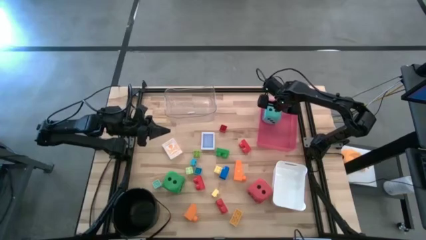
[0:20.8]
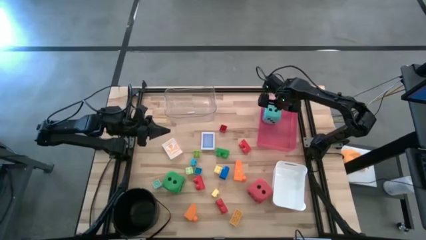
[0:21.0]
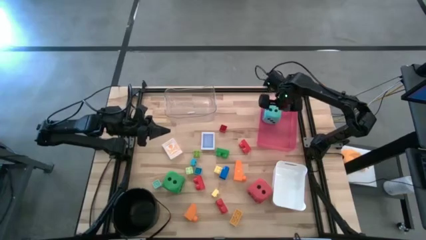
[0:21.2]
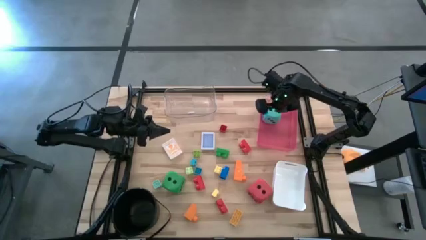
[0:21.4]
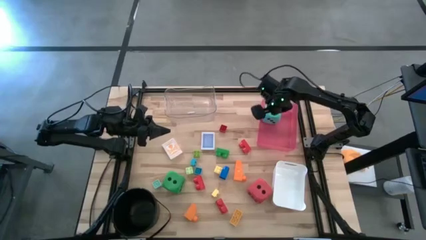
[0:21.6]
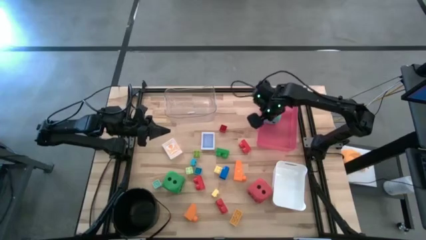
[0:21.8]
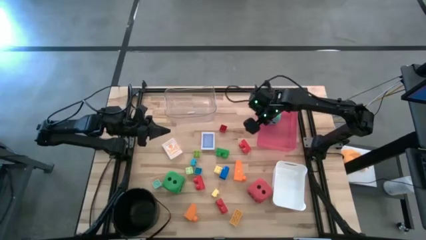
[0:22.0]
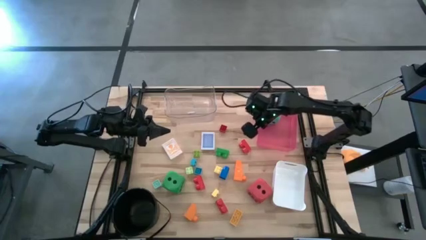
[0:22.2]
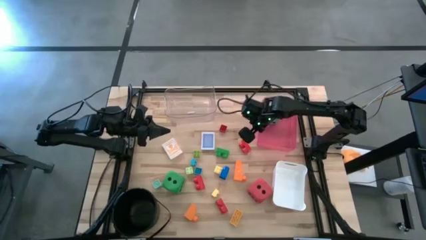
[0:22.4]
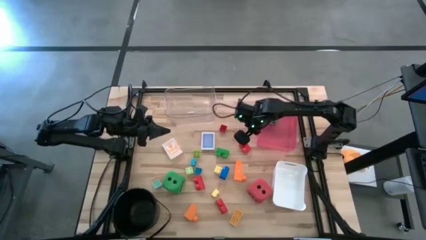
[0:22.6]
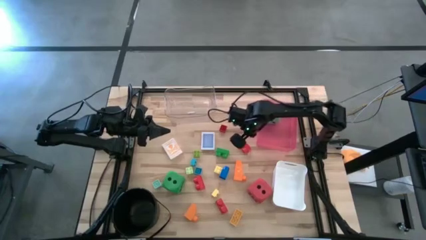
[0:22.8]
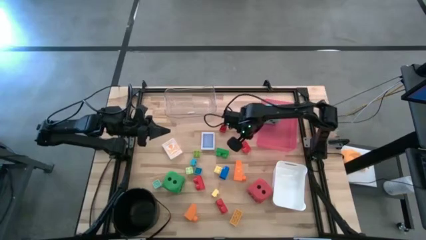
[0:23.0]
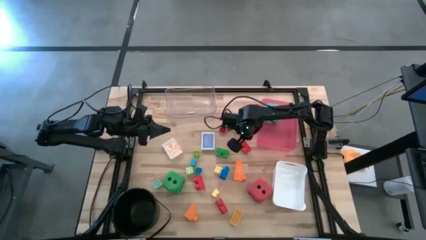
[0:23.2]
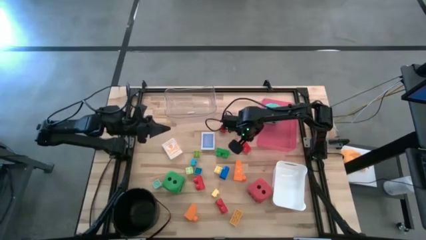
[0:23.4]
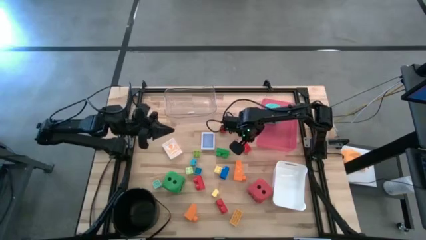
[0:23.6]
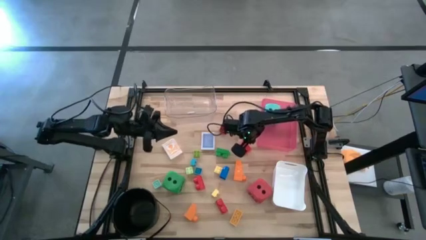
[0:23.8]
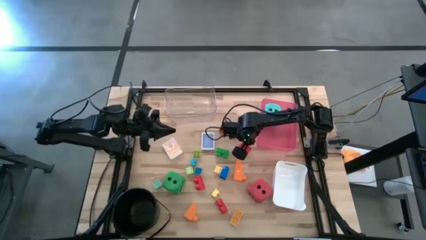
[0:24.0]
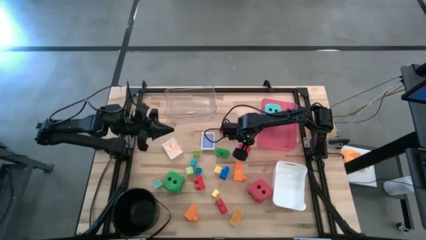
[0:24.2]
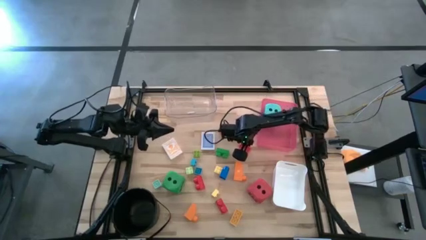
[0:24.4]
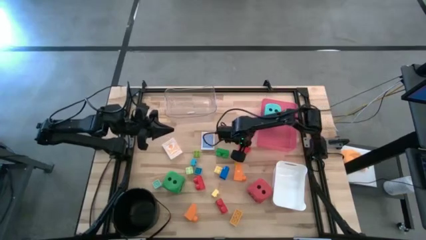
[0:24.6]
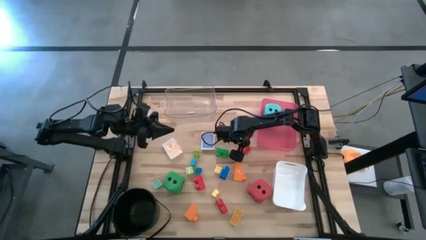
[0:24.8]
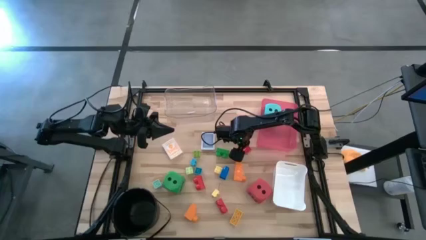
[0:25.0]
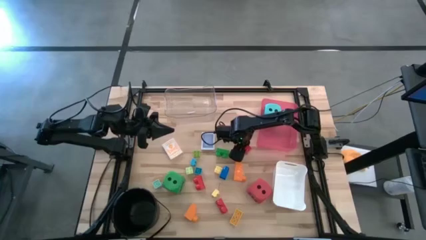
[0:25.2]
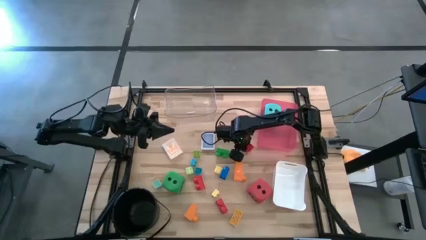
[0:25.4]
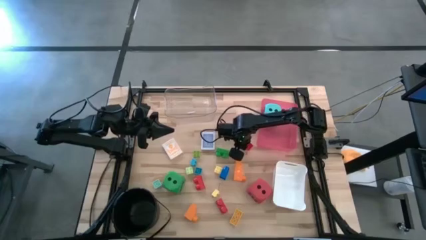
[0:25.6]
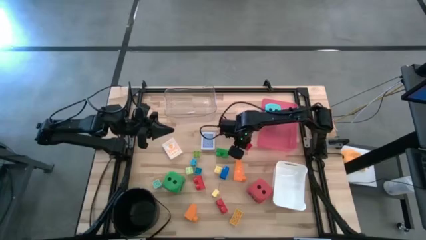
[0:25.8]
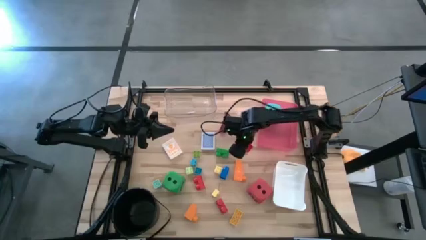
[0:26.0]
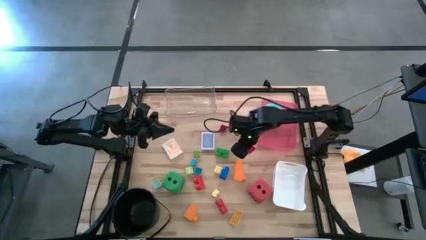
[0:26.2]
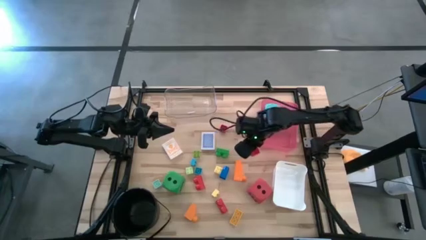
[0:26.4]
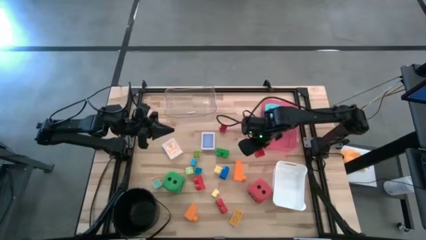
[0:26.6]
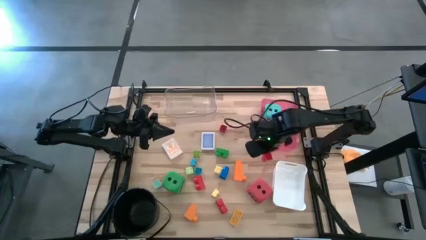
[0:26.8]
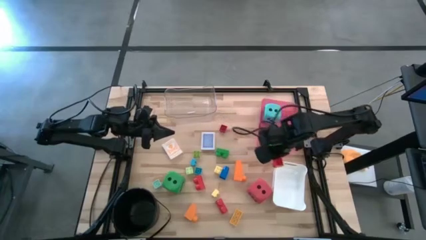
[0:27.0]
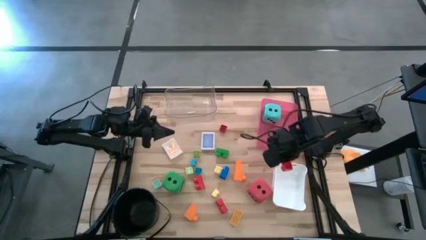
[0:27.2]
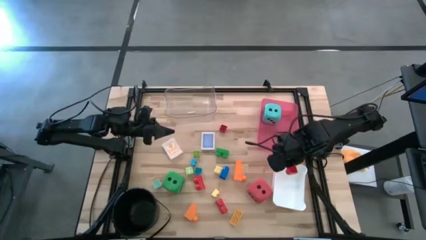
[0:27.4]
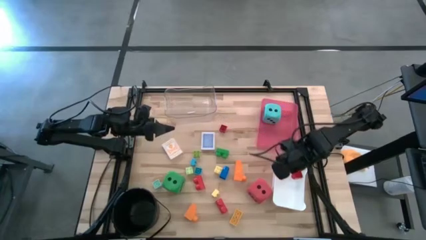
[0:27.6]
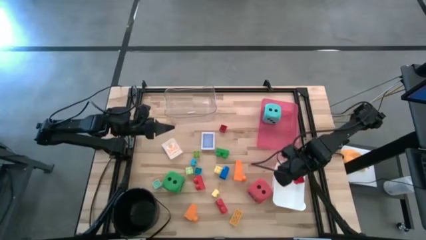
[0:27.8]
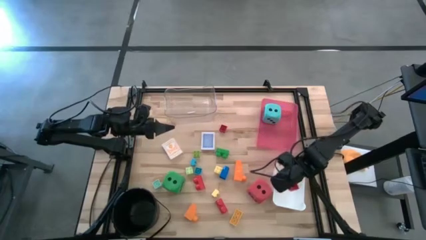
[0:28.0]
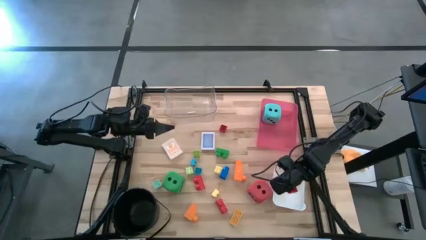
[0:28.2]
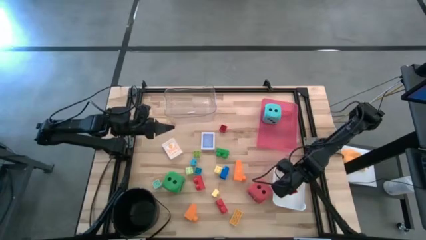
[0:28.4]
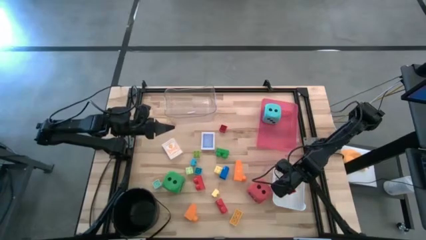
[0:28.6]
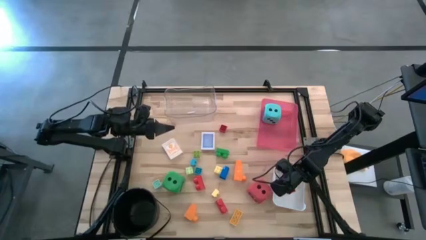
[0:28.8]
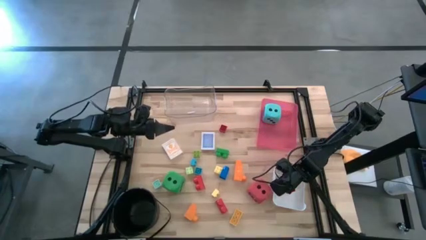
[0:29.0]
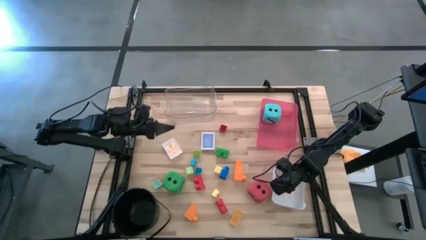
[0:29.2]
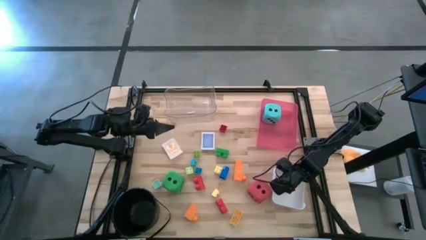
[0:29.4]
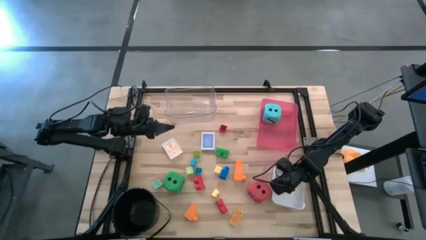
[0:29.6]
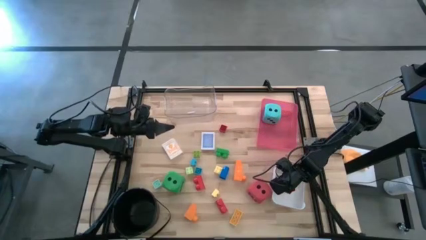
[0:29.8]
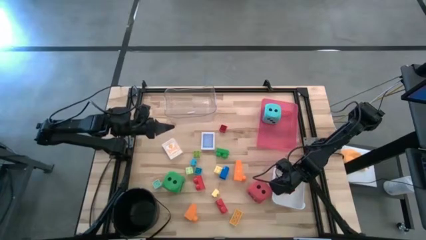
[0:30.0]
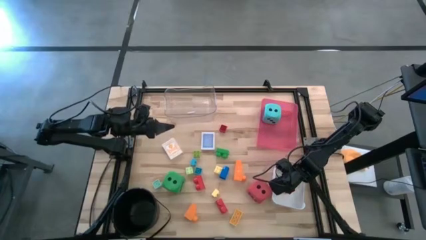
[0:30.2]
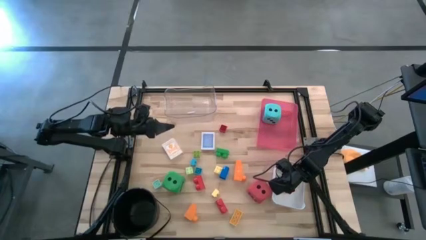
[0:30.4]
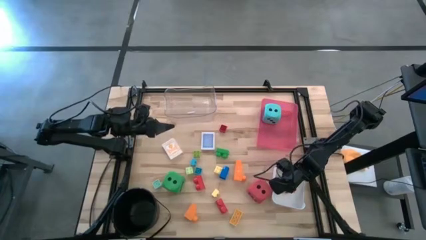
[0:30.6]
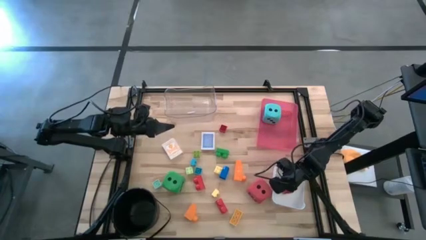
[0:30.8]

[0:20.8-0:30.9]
Task: Pick & Place Toys
Put the red game piece into the white bin
